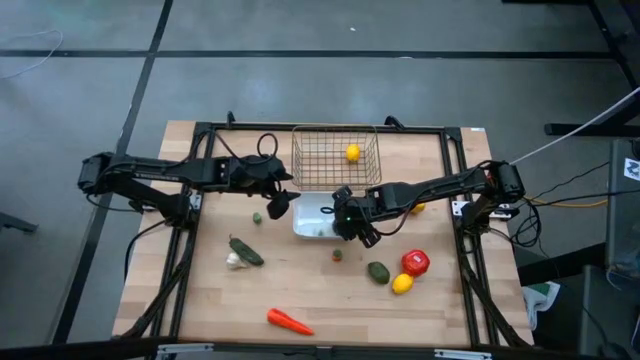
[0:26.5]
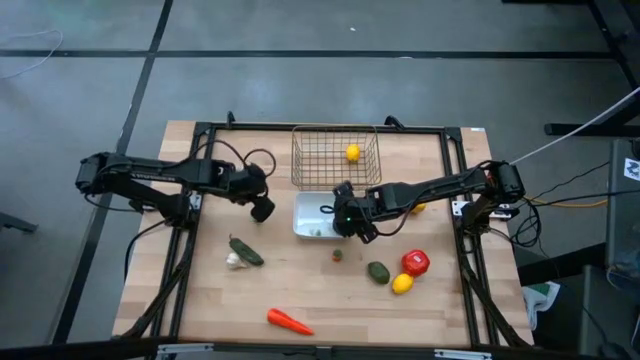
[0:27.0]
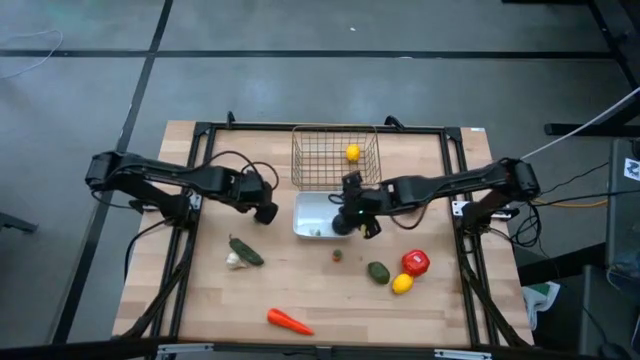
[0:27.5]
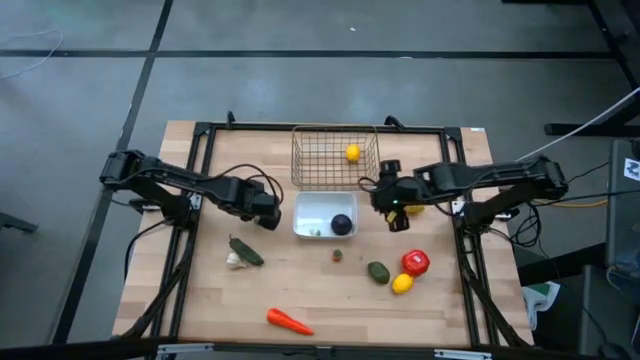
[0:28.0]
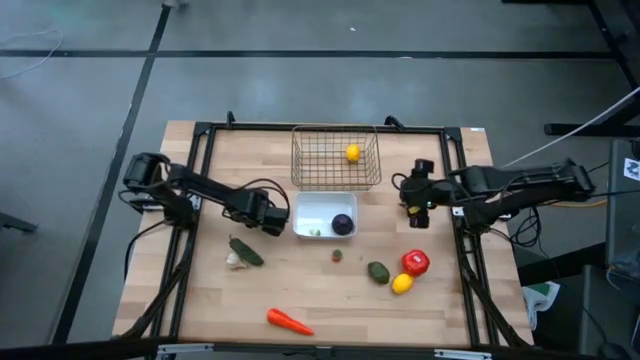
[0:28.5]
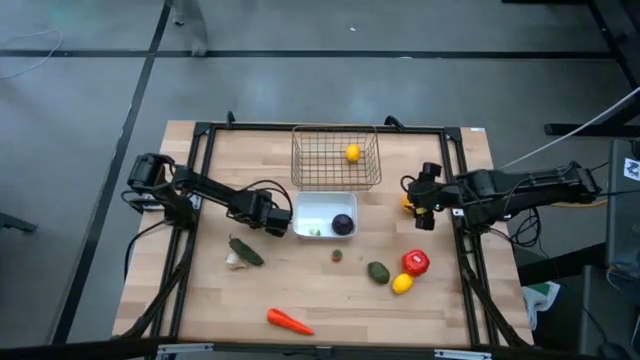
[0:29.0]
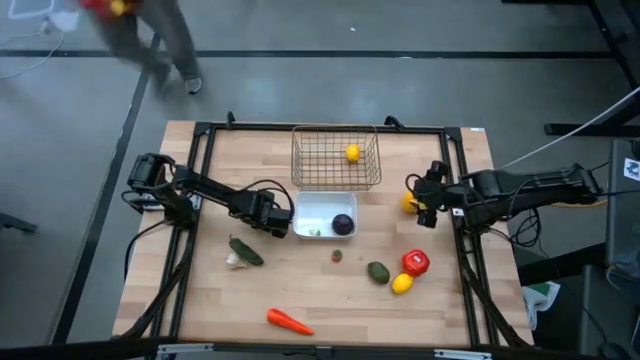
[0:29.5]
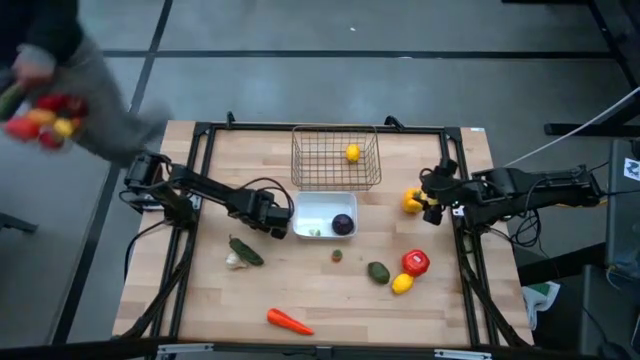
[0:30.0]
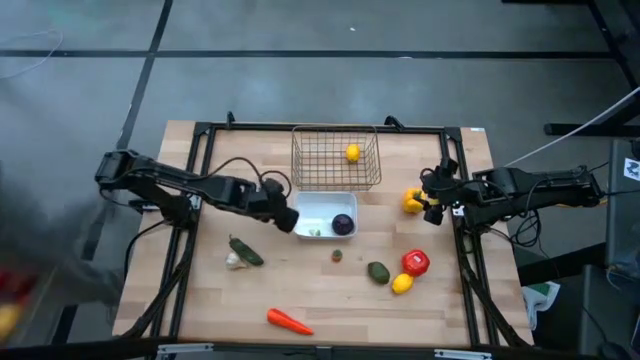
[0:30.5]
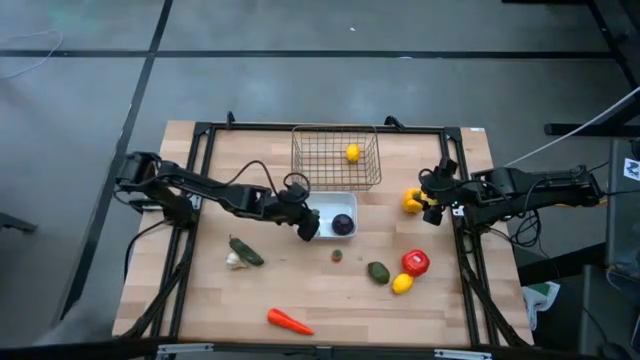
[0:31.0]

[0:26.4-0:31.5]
Task: Sort produce into baskets
Put the left green bell pepper into the white bin

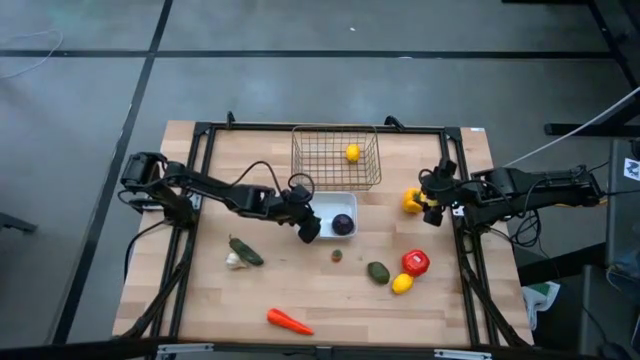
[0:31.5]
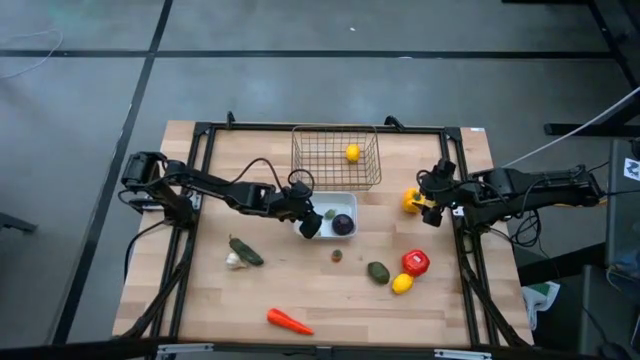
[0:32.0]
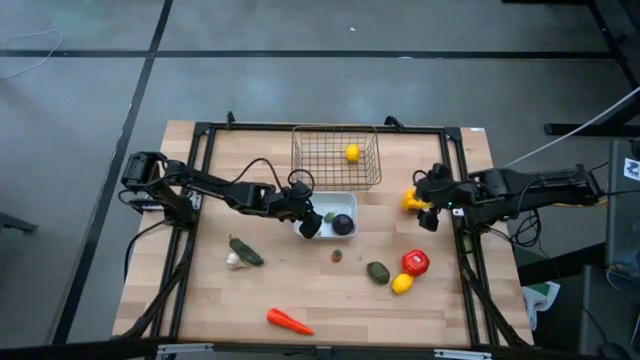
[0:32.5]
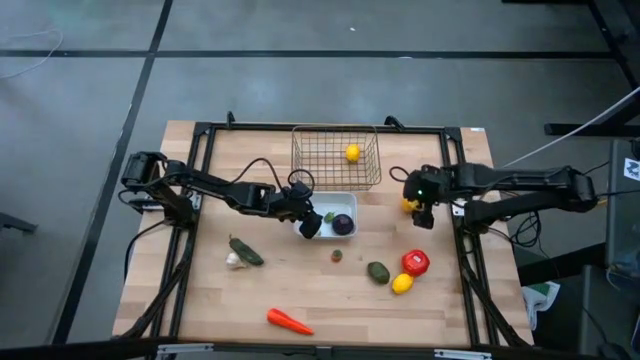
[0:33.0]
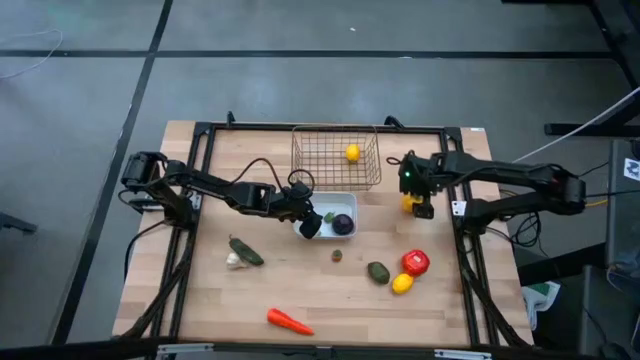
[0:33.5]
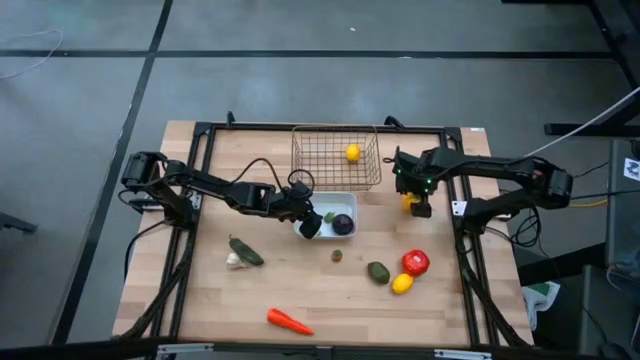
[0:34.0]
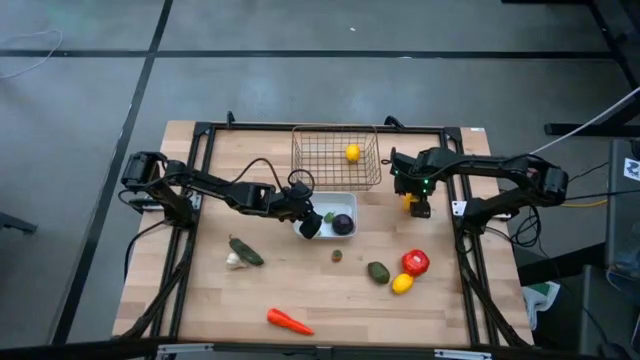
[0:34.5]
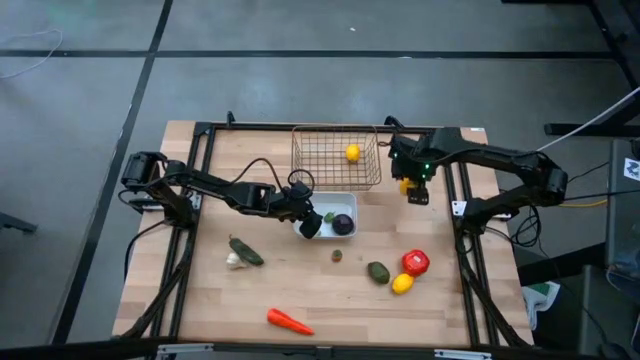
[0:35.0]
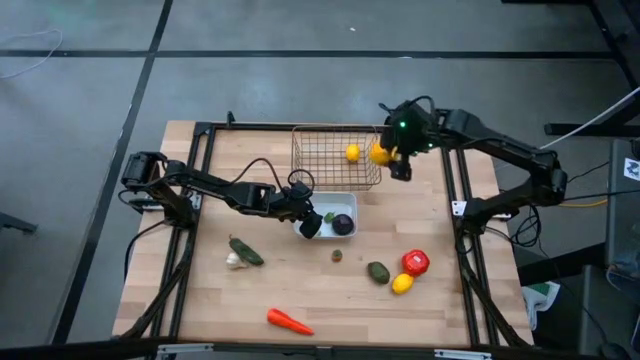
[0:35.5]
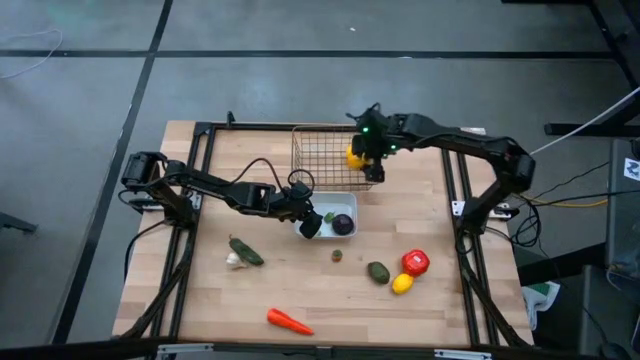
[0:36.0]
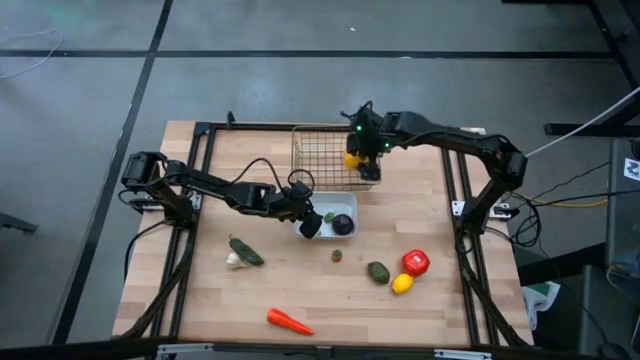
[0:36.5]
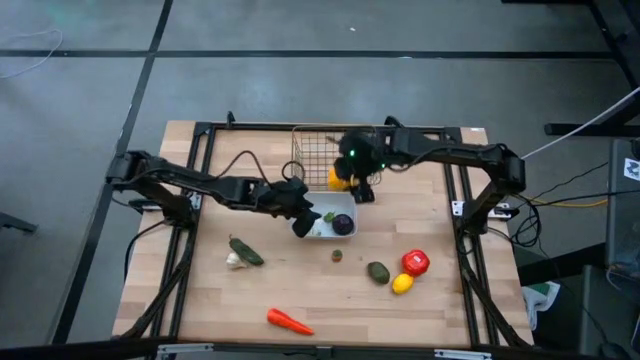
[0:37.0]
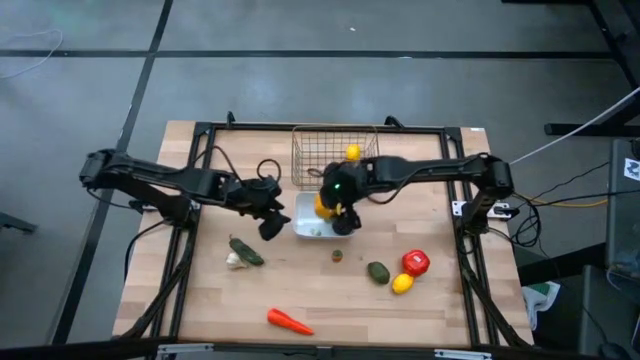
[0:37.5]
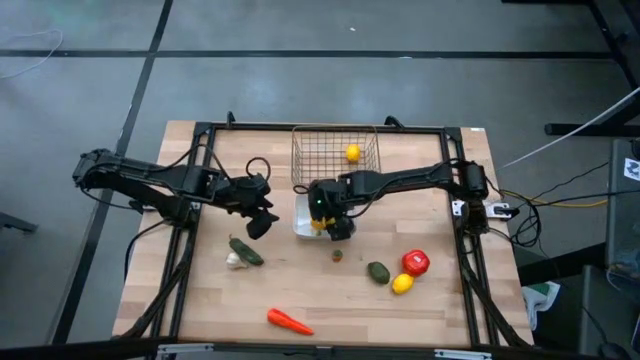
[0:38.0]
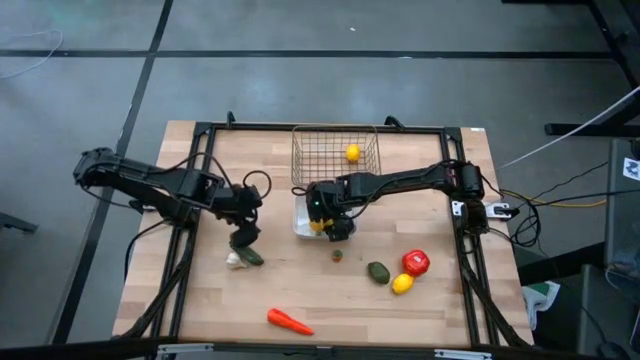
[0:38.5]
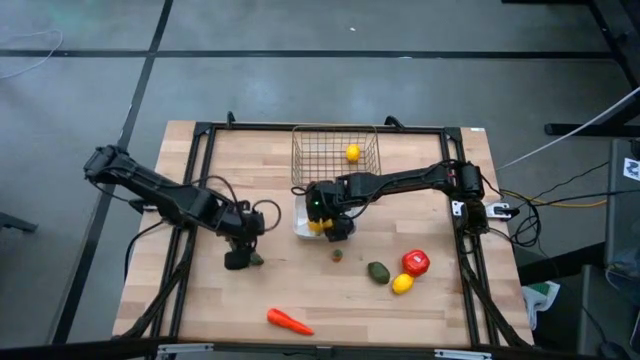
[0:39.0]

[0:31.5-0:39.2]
Put the yellow bell pepper into the white bin

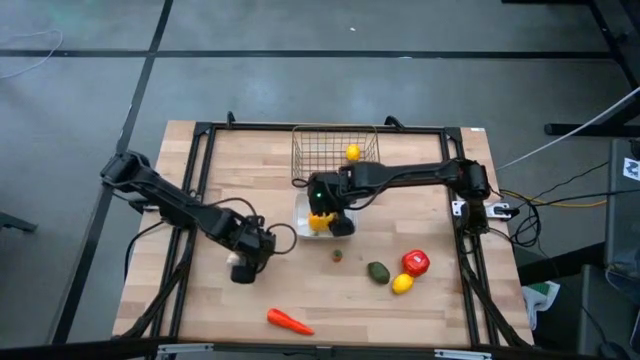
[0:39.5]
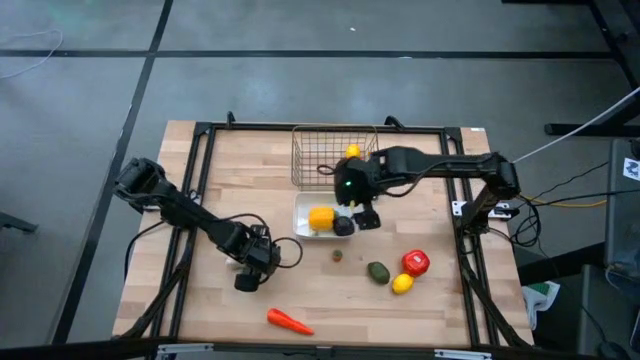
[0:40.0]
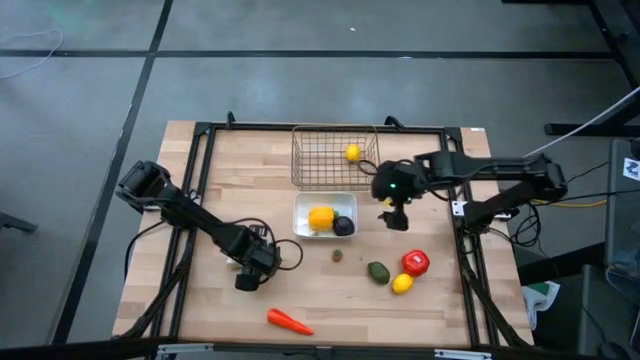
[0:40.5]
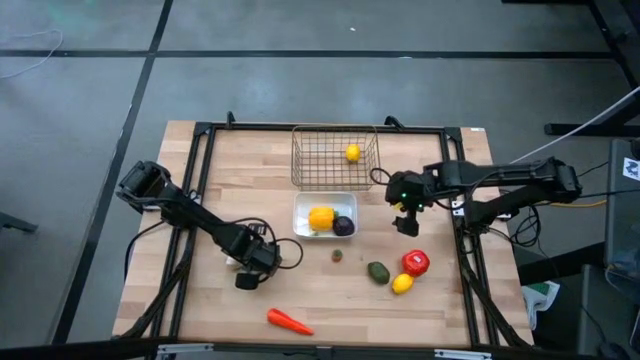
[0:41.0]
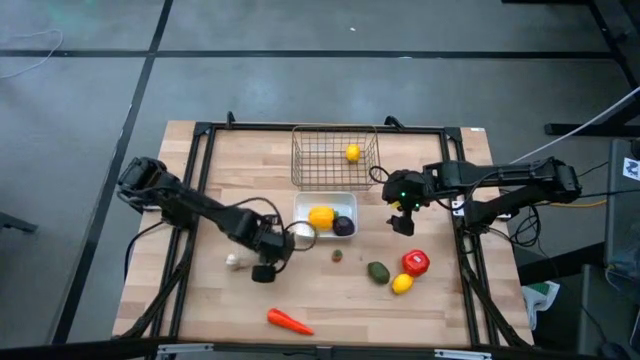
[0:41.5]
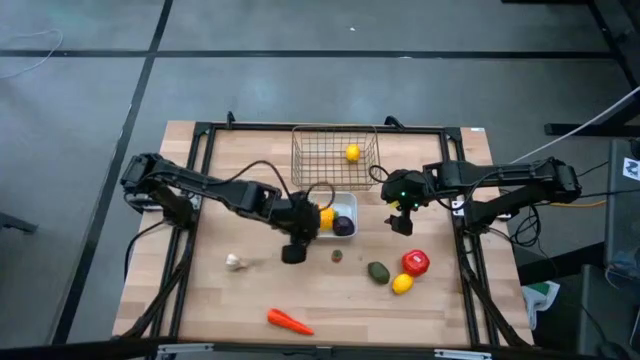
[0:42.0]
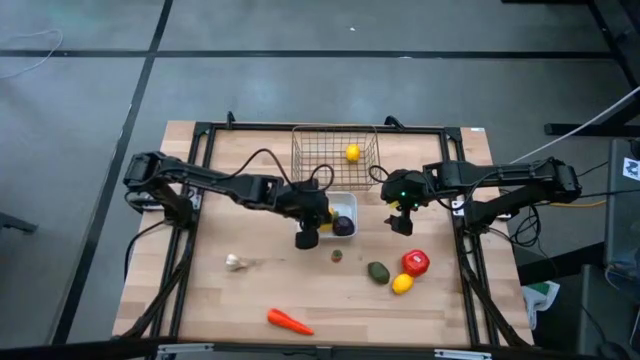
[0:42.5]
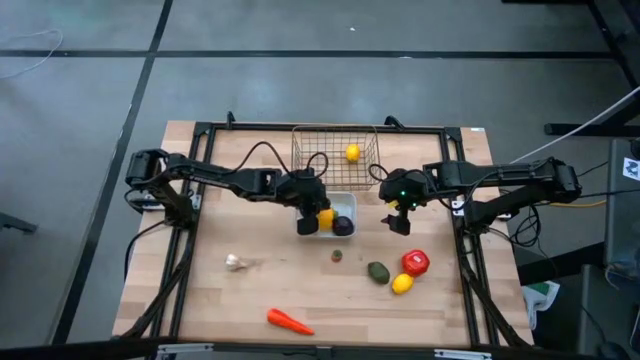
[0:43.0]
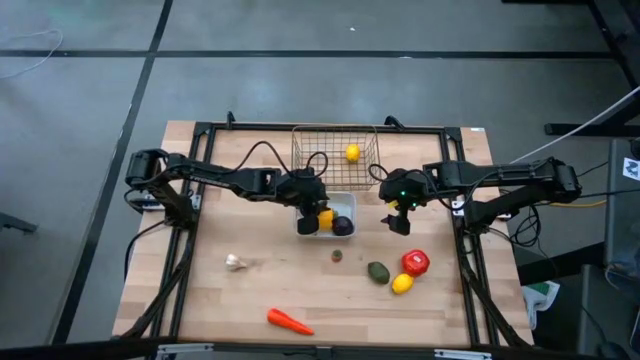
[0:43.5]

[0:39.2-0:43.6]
Put the green chili pepper into the white bin

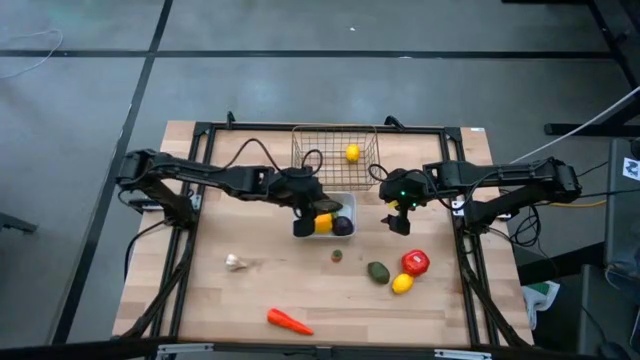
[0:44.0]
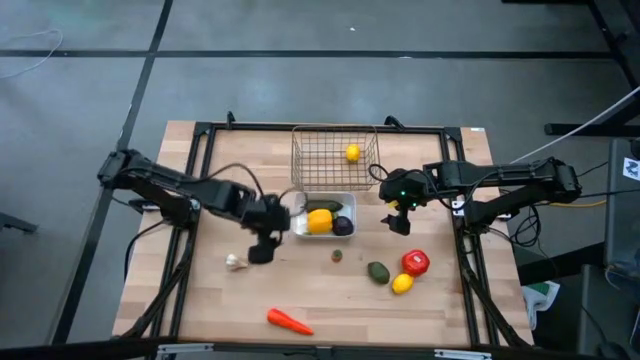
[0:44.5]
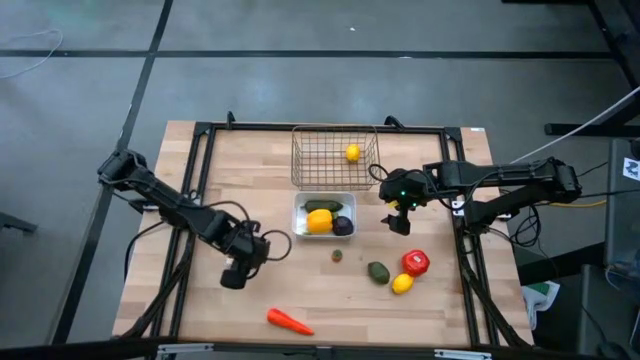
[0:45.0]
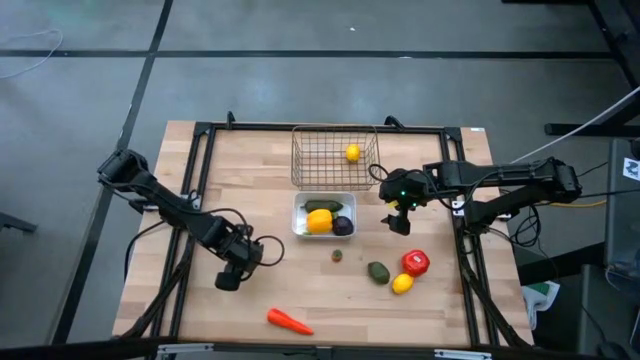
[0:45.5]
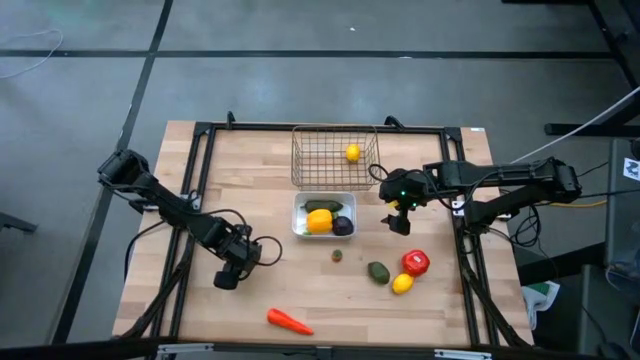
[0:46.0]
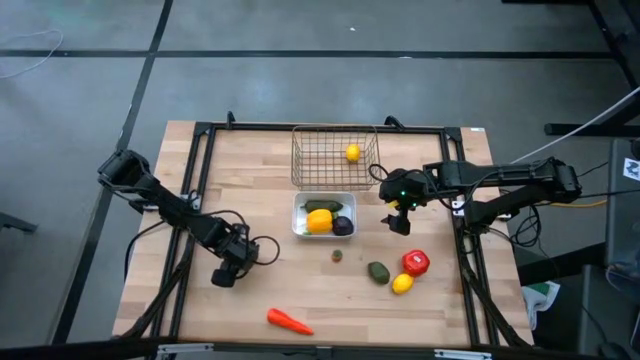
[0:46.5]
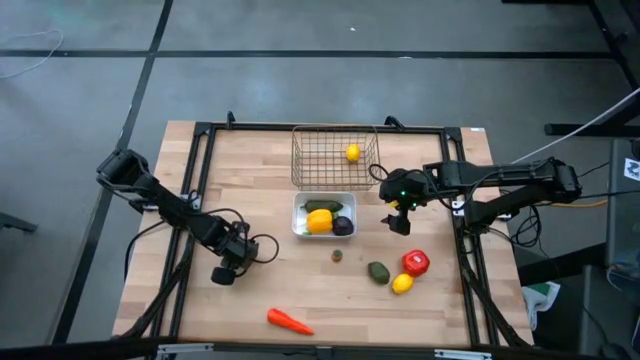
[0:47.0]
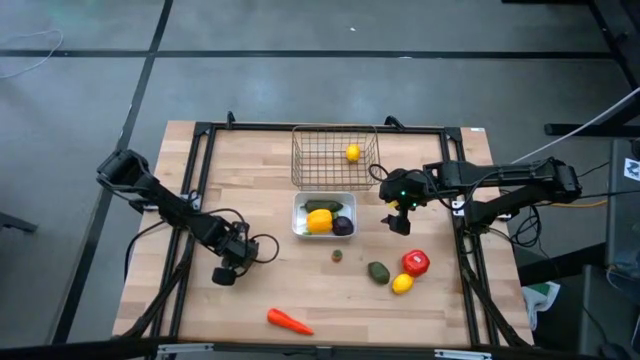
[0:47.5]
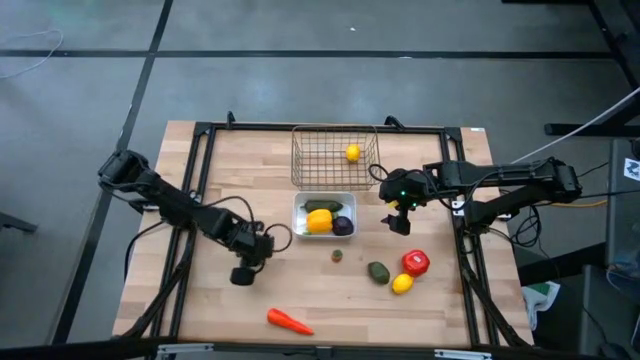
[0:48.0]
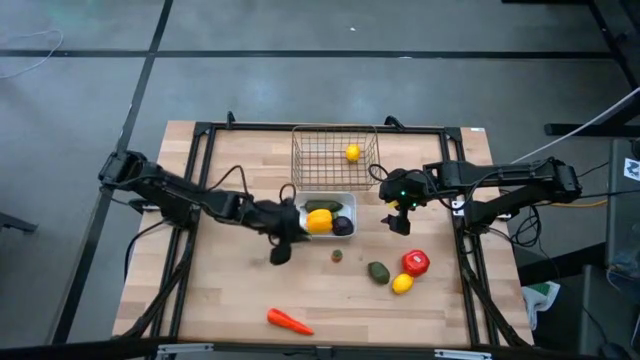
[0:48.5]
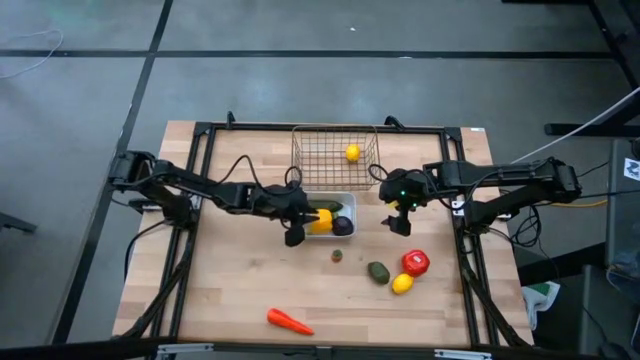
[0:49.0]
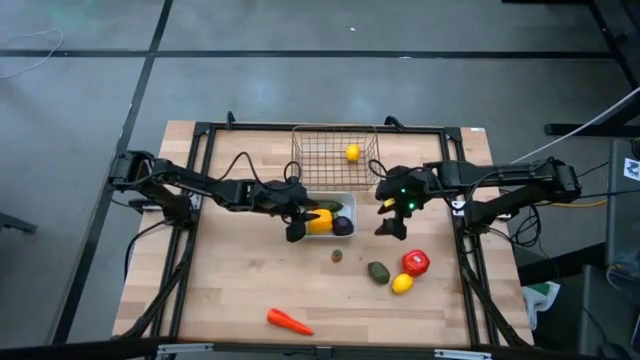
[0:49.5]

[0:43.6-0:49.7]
Put the garlic into the white bin
